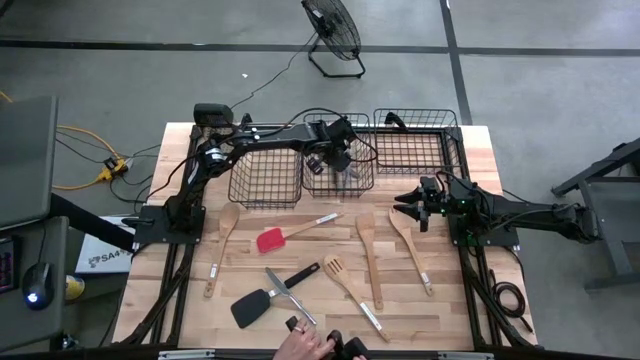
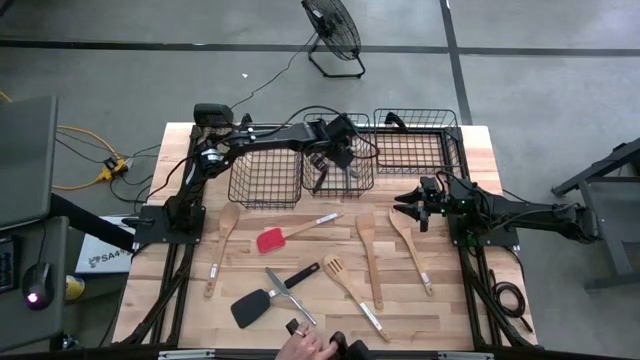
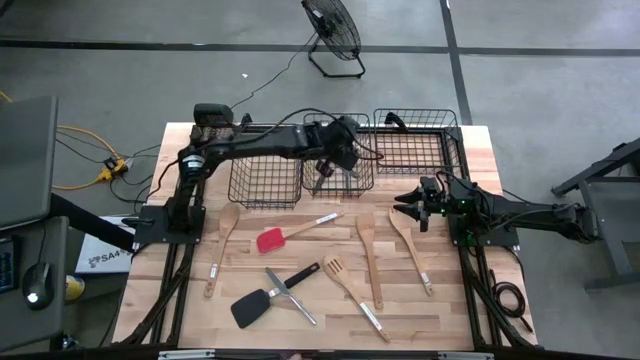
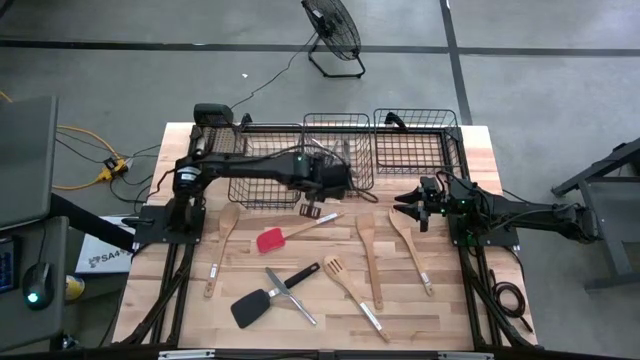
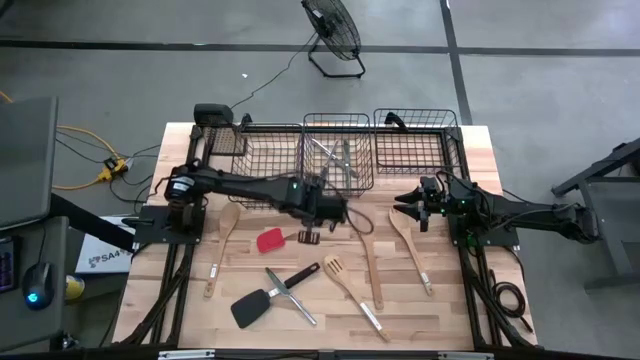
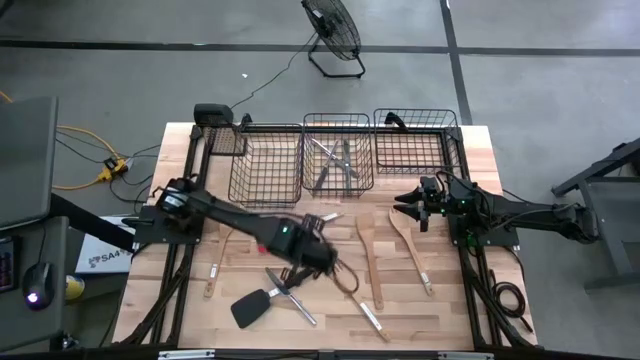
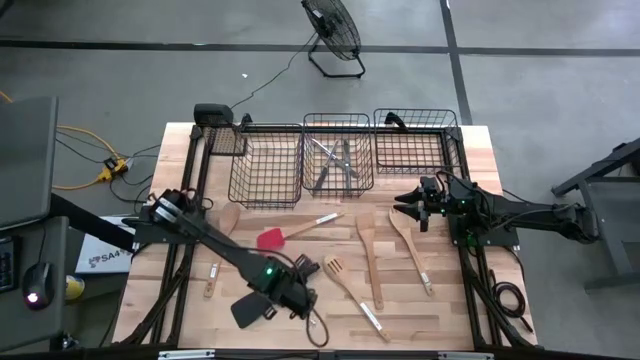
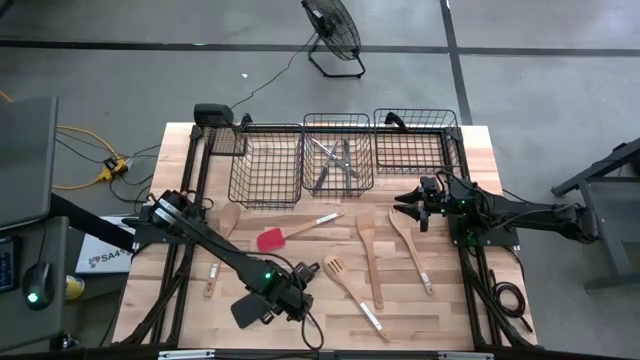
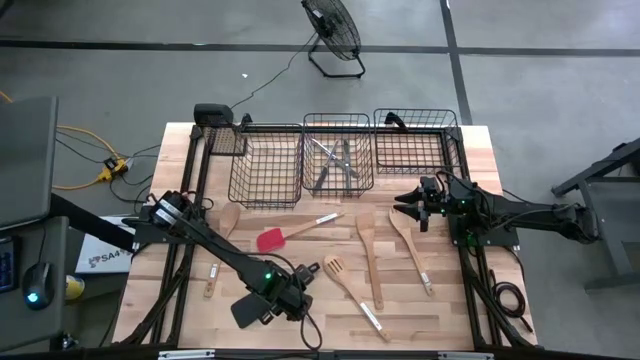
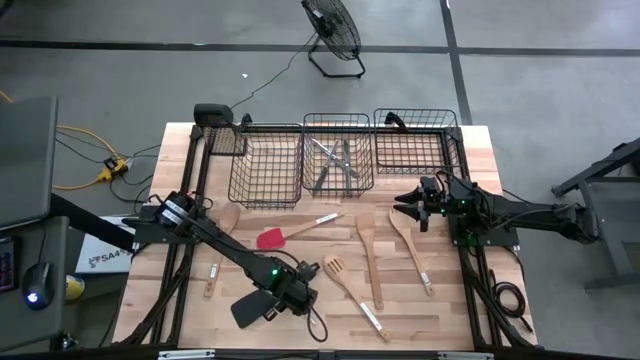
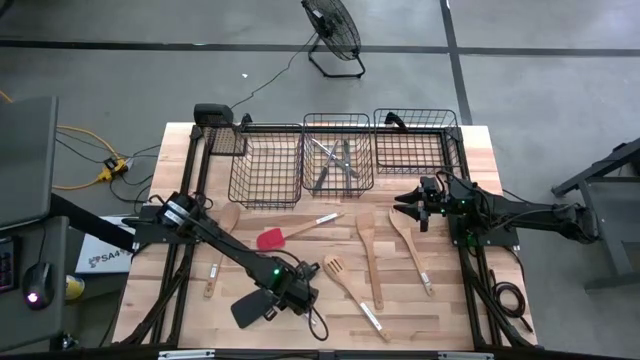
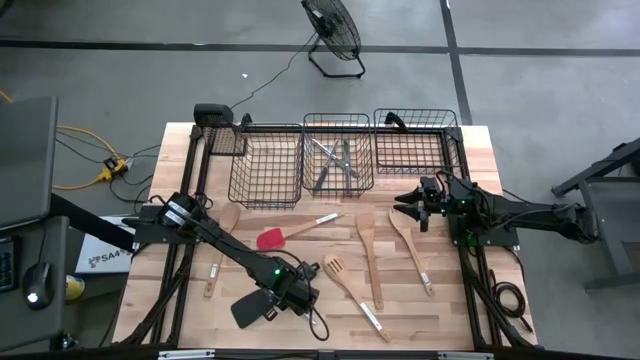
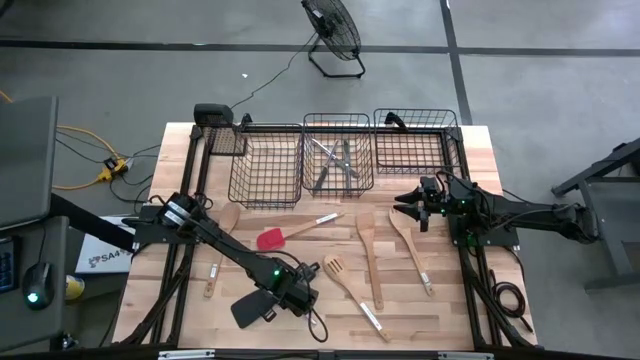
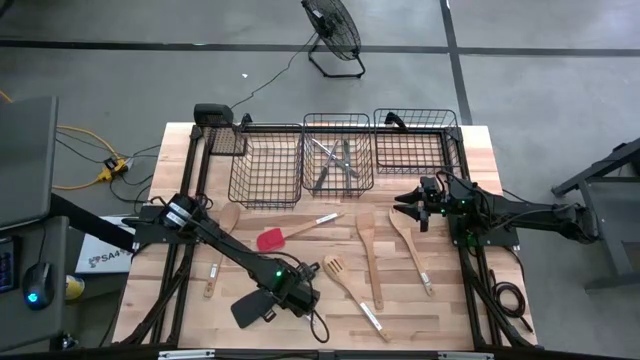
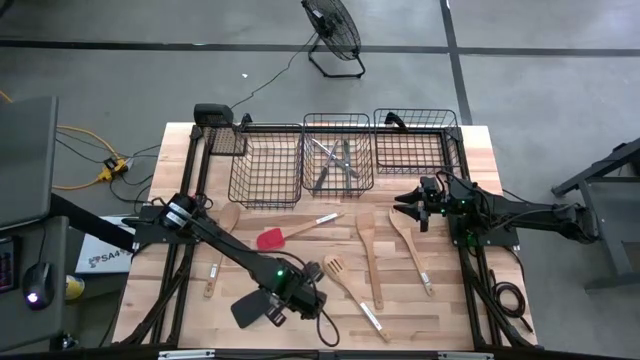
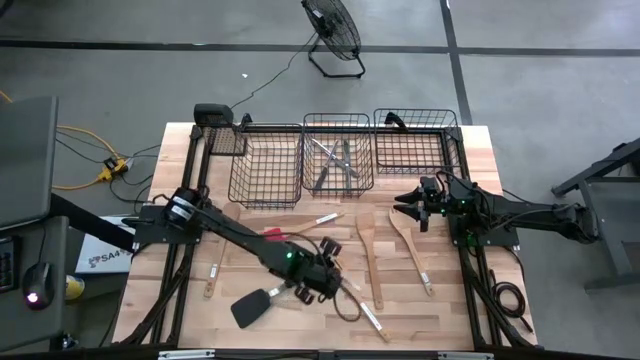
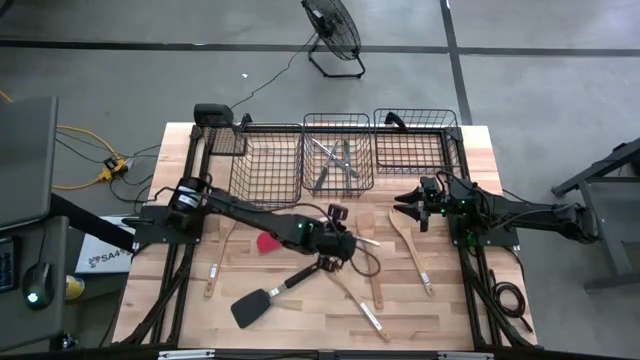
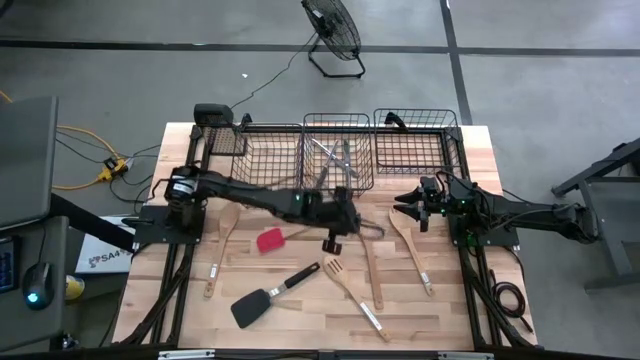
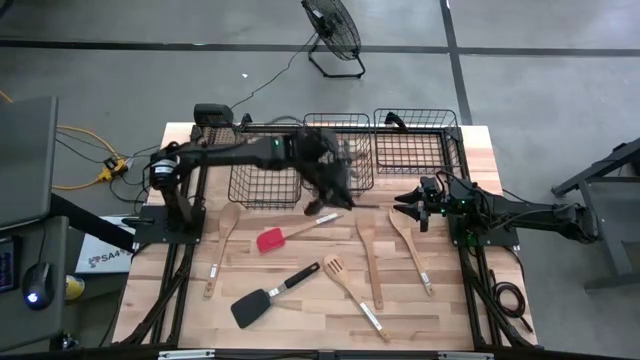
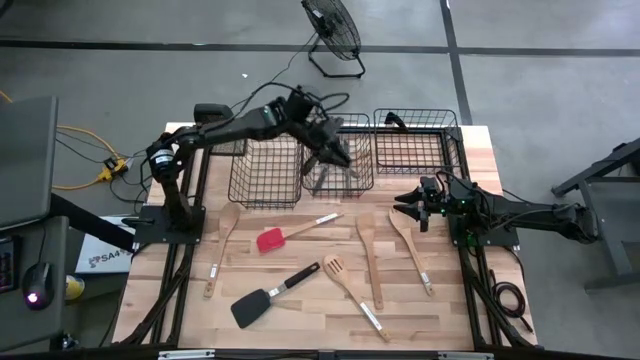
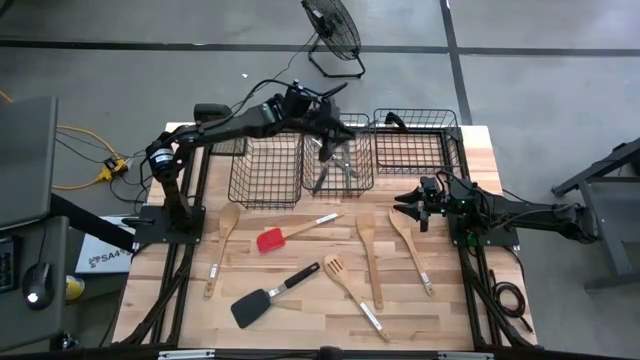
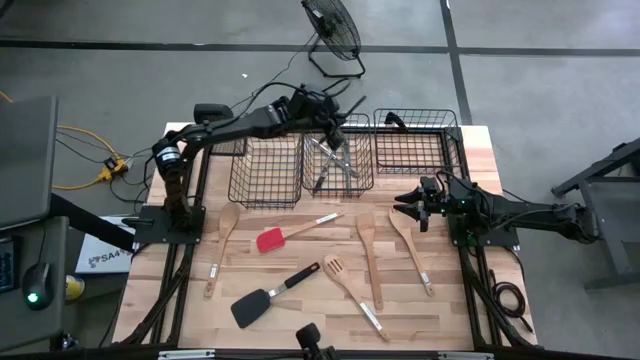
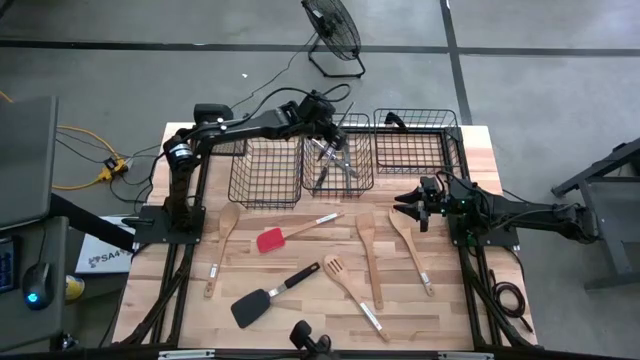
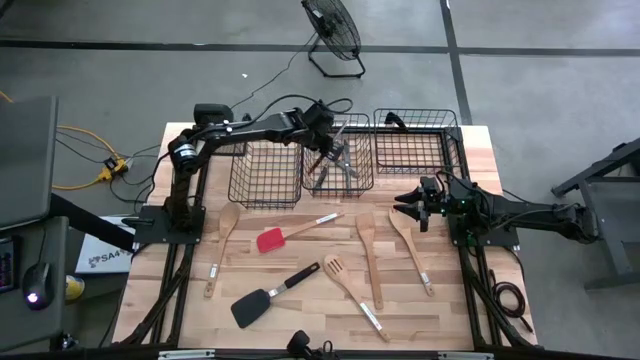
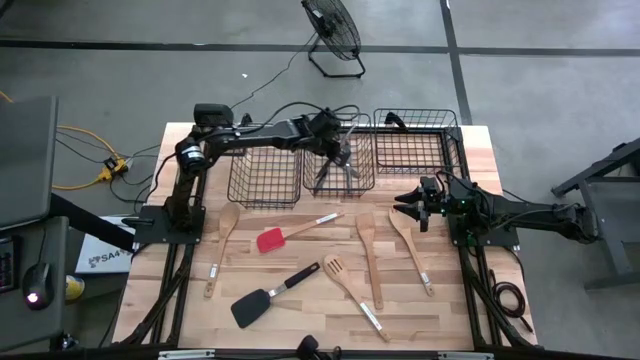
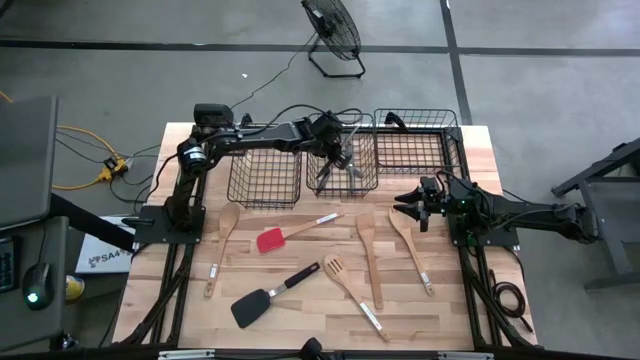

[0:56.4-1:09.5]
Task: Pick & Place Kitchen Items
Put the silver knife into the middle wire basket
